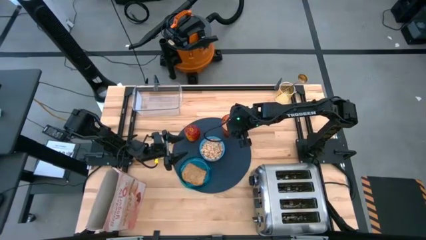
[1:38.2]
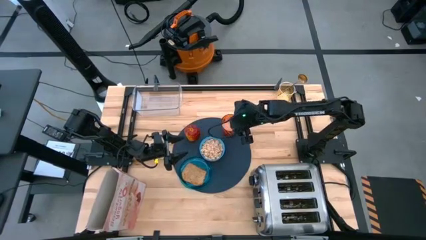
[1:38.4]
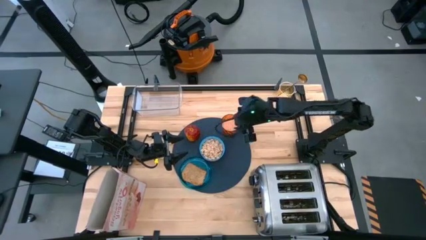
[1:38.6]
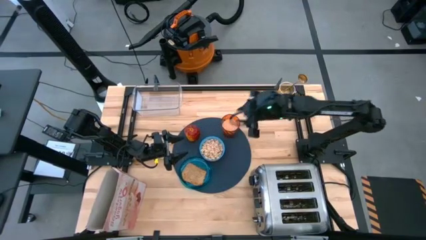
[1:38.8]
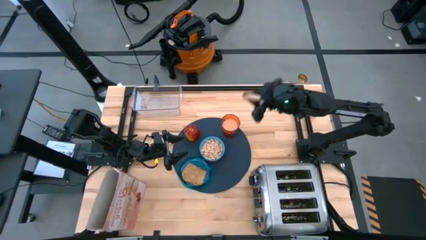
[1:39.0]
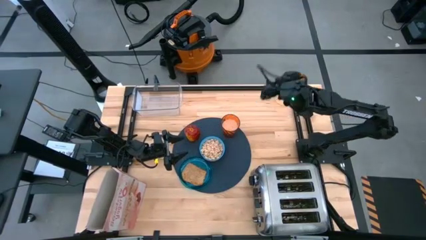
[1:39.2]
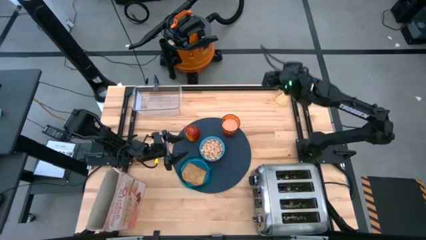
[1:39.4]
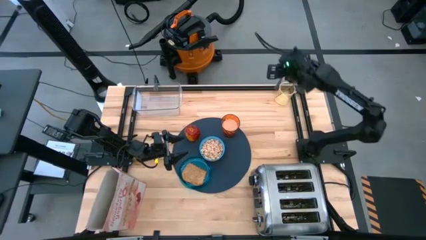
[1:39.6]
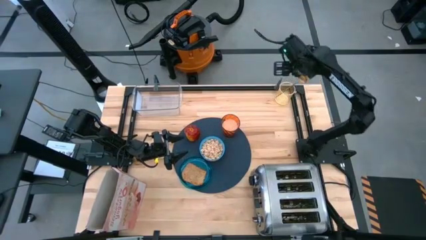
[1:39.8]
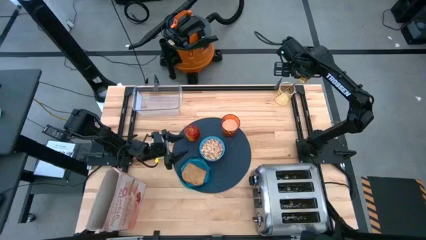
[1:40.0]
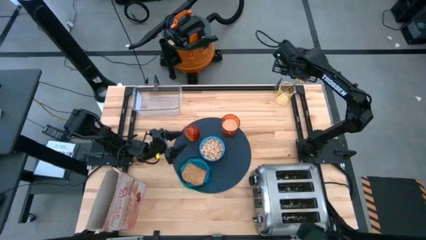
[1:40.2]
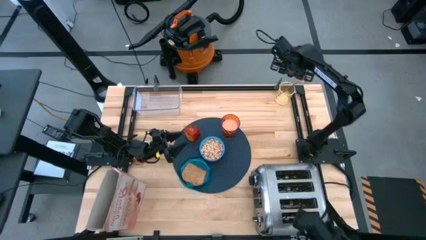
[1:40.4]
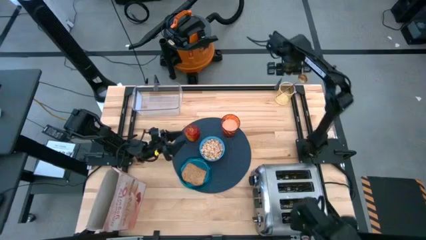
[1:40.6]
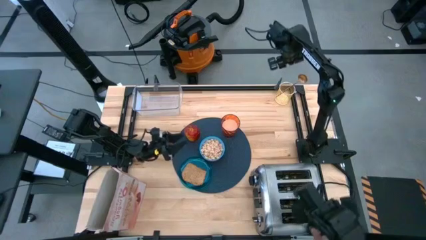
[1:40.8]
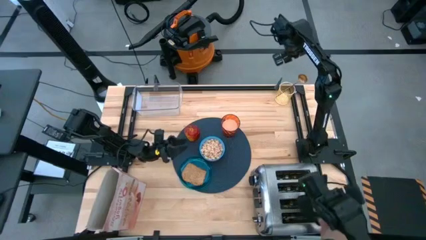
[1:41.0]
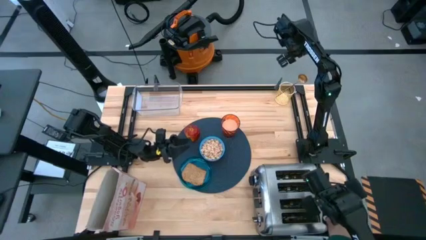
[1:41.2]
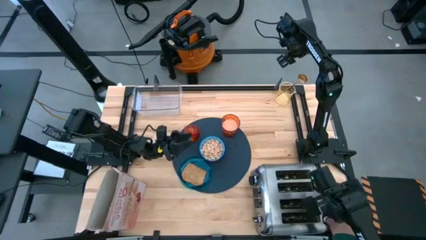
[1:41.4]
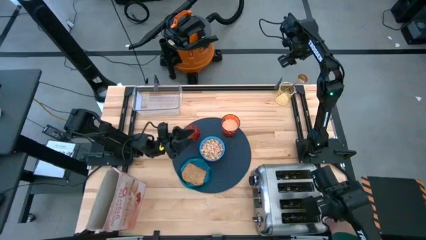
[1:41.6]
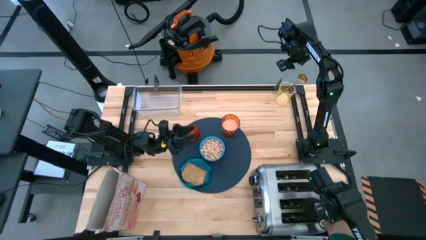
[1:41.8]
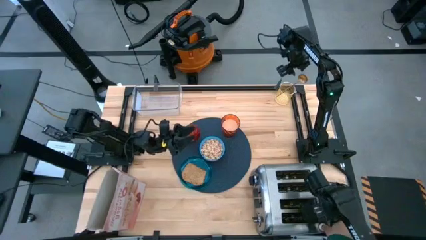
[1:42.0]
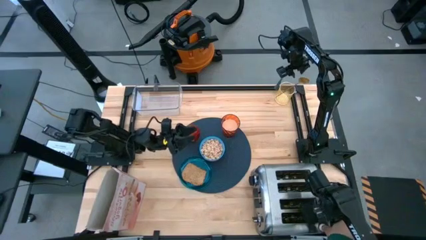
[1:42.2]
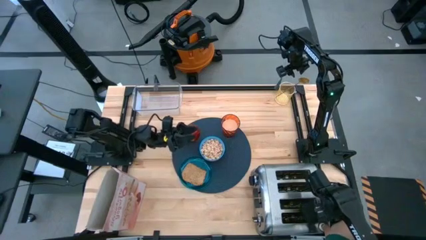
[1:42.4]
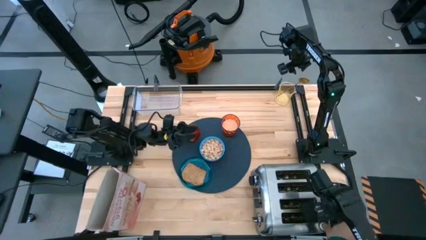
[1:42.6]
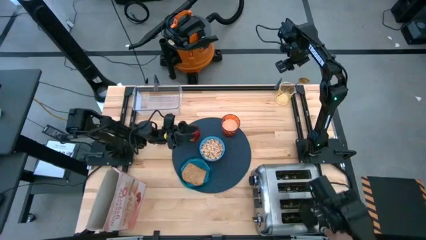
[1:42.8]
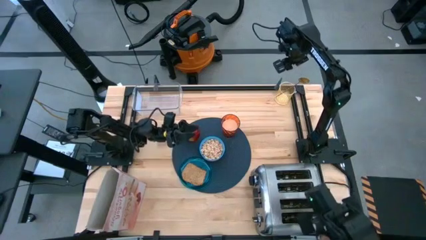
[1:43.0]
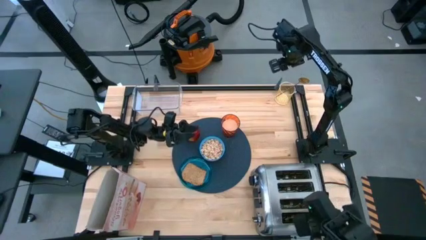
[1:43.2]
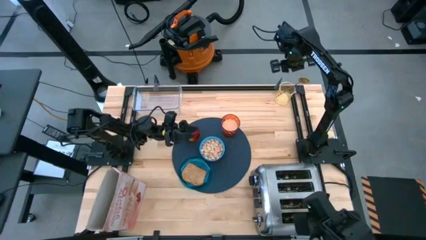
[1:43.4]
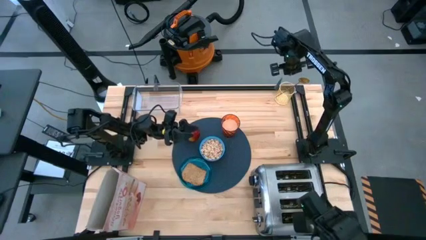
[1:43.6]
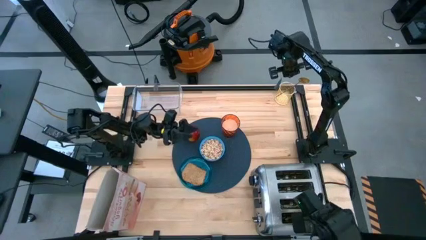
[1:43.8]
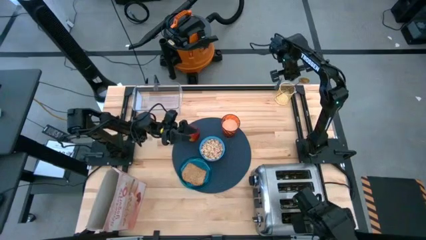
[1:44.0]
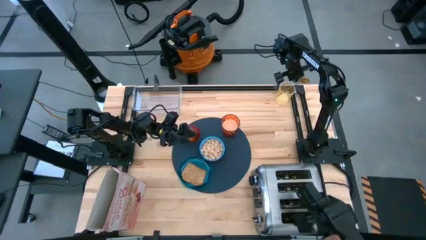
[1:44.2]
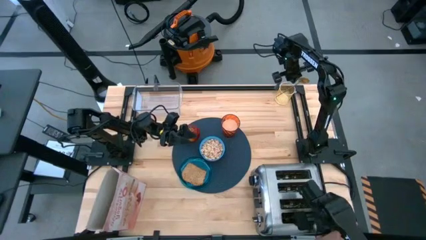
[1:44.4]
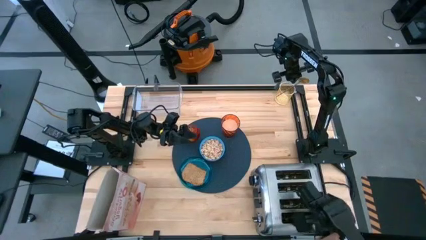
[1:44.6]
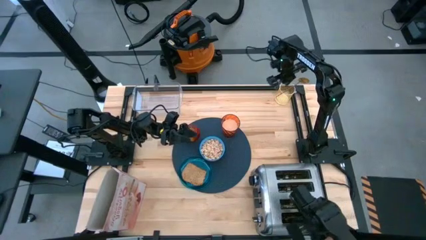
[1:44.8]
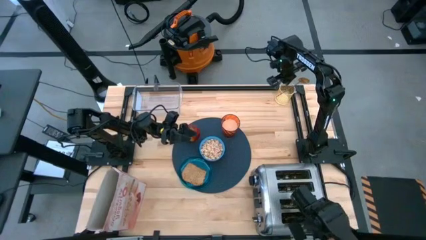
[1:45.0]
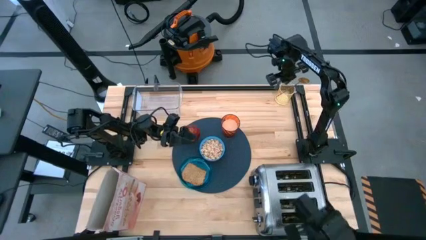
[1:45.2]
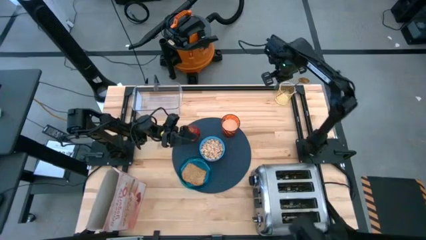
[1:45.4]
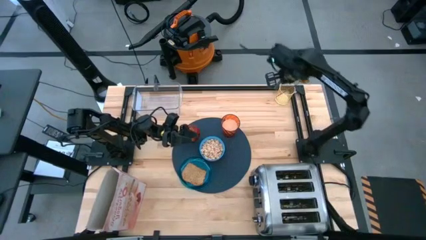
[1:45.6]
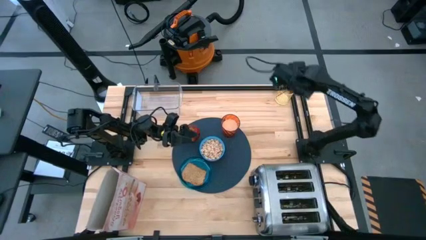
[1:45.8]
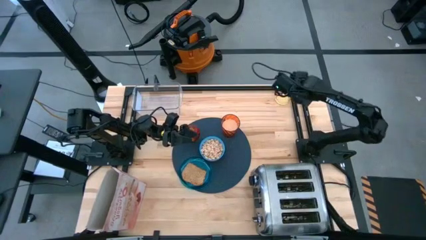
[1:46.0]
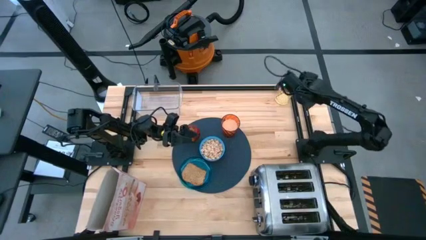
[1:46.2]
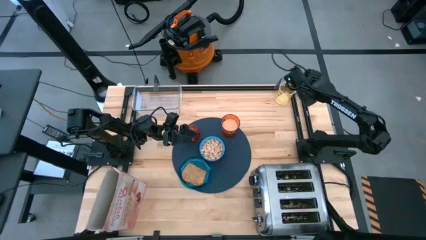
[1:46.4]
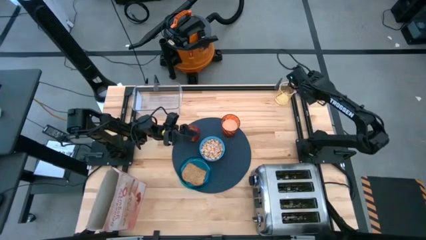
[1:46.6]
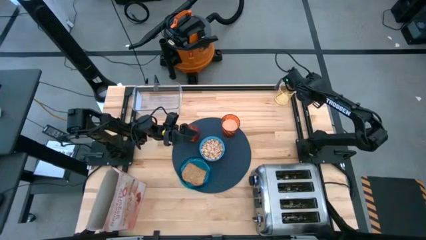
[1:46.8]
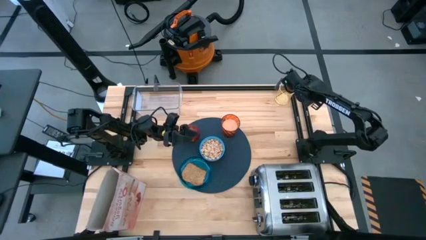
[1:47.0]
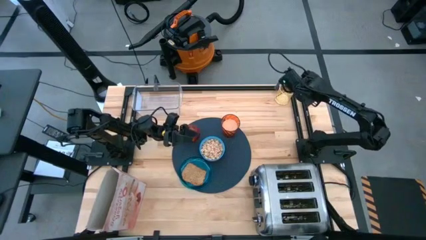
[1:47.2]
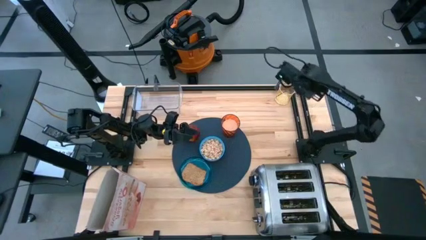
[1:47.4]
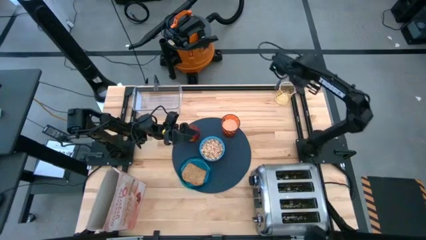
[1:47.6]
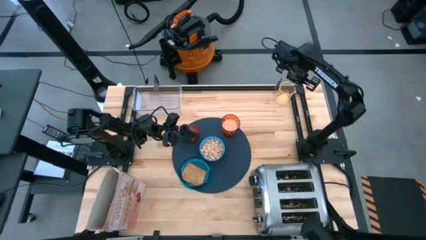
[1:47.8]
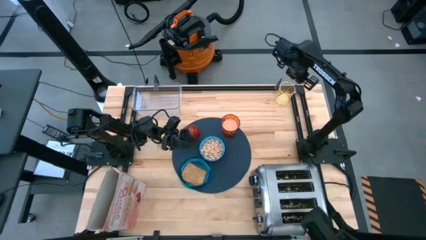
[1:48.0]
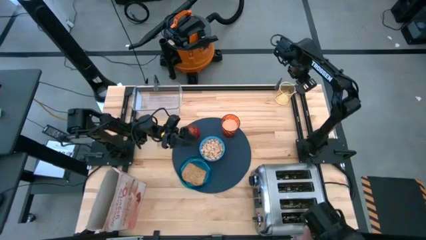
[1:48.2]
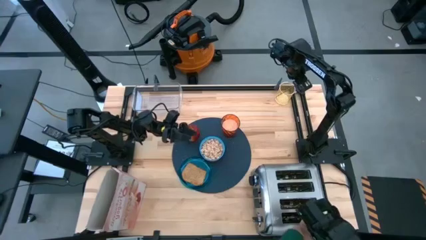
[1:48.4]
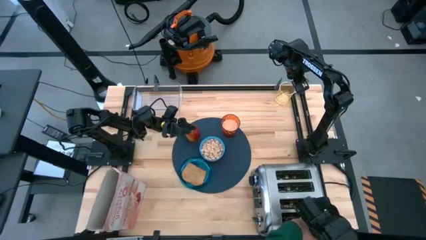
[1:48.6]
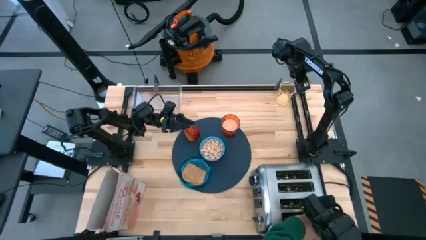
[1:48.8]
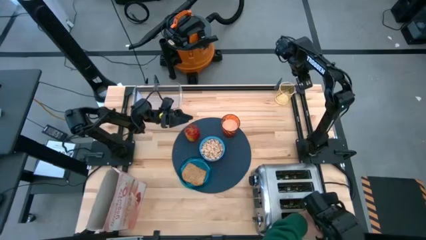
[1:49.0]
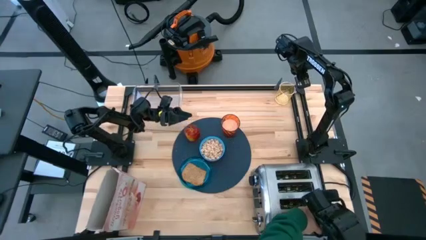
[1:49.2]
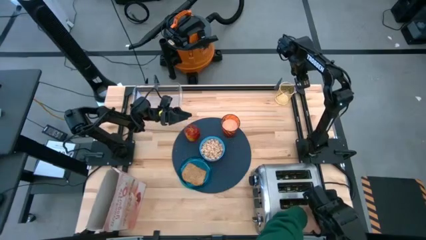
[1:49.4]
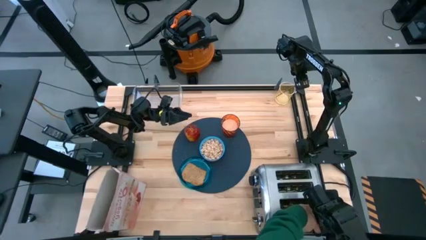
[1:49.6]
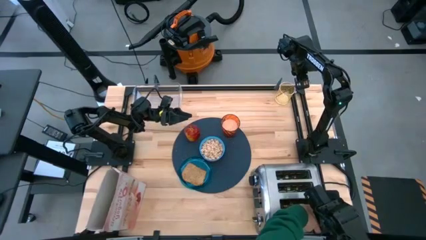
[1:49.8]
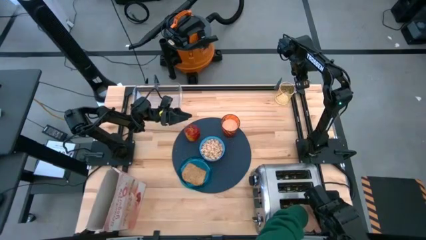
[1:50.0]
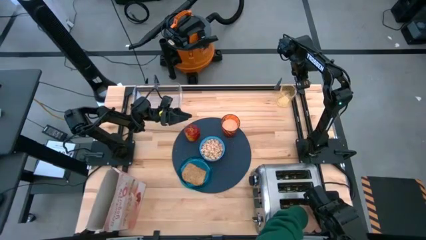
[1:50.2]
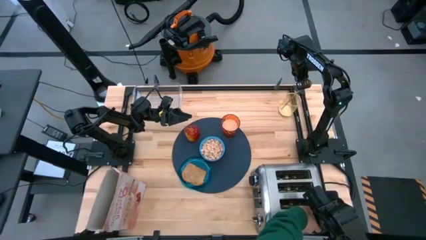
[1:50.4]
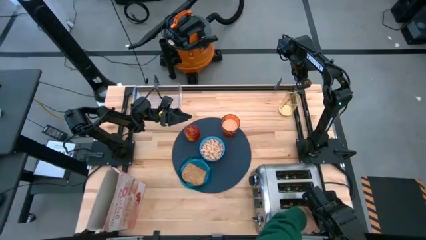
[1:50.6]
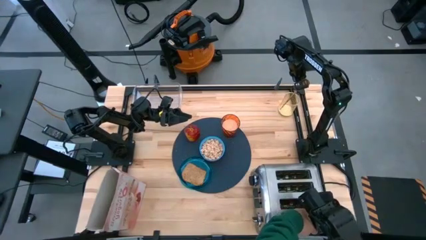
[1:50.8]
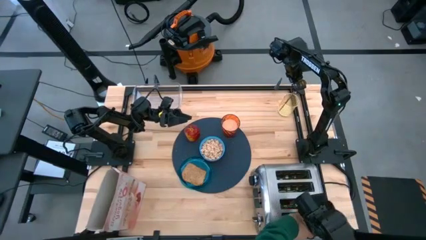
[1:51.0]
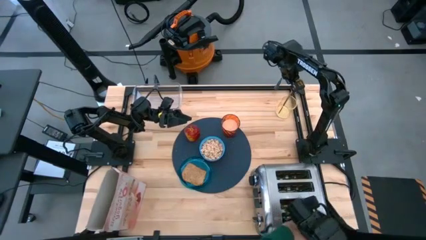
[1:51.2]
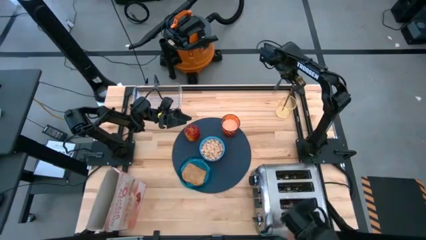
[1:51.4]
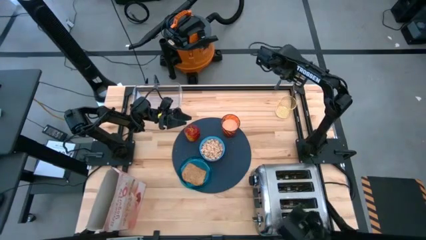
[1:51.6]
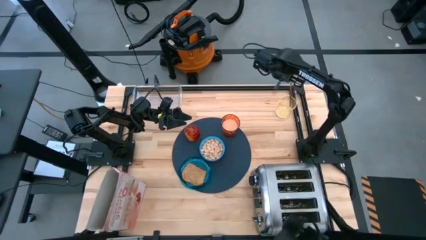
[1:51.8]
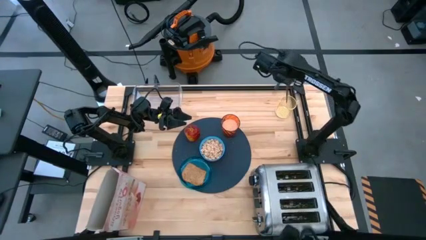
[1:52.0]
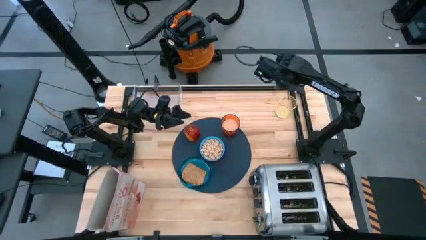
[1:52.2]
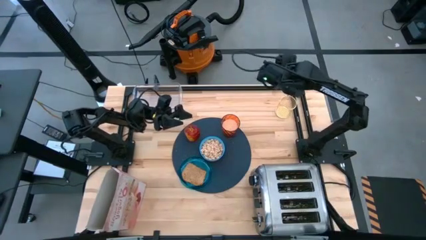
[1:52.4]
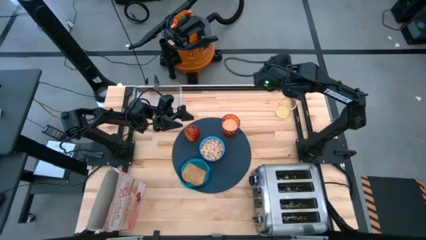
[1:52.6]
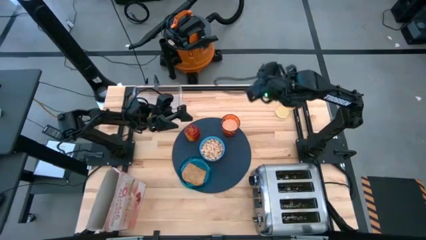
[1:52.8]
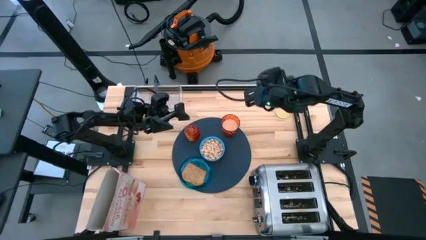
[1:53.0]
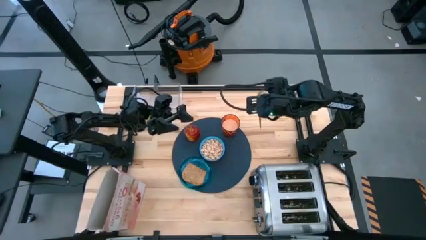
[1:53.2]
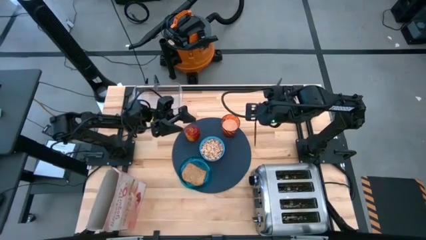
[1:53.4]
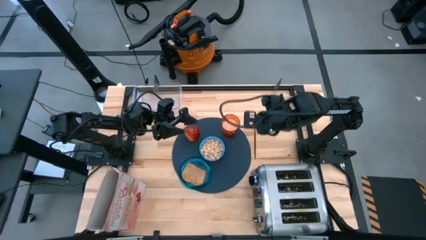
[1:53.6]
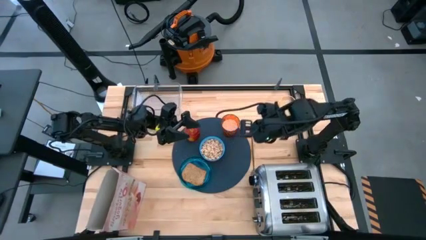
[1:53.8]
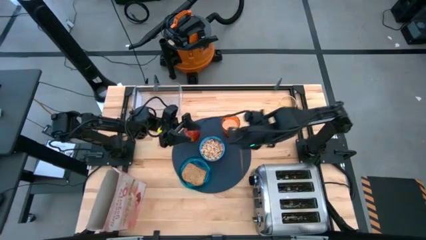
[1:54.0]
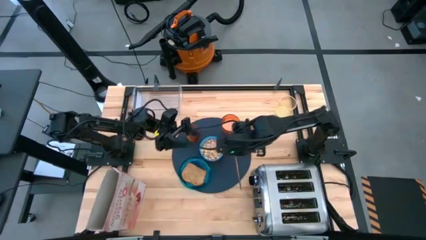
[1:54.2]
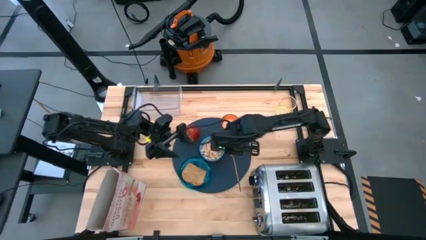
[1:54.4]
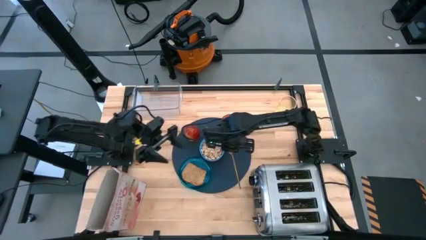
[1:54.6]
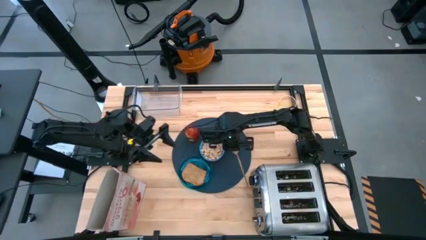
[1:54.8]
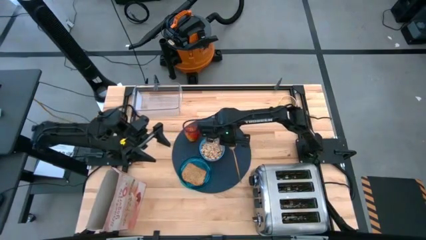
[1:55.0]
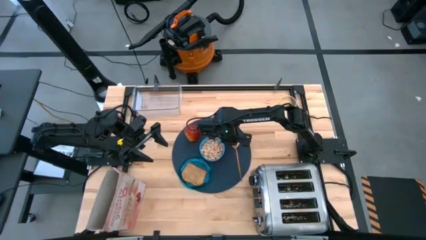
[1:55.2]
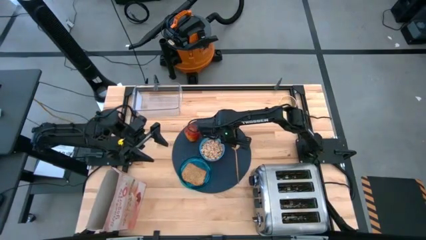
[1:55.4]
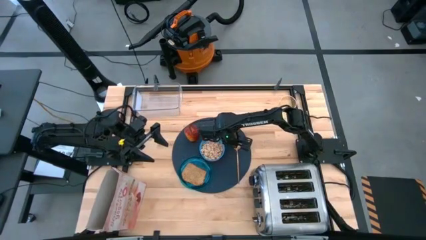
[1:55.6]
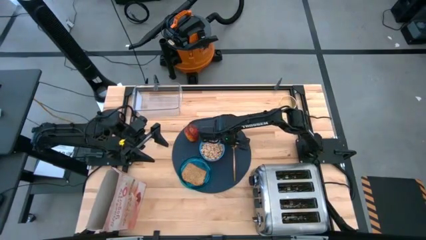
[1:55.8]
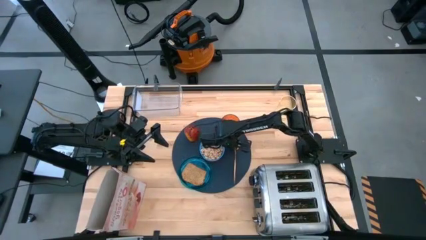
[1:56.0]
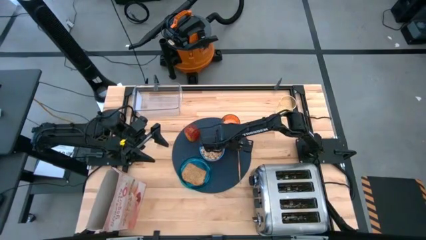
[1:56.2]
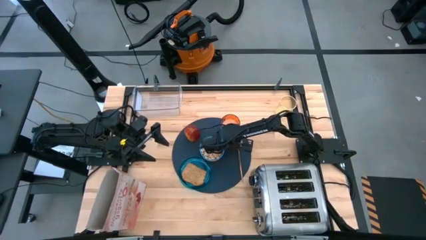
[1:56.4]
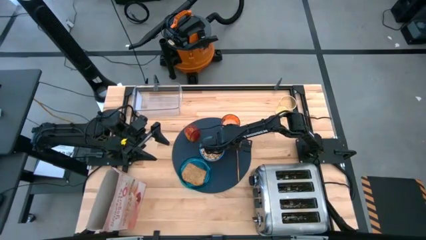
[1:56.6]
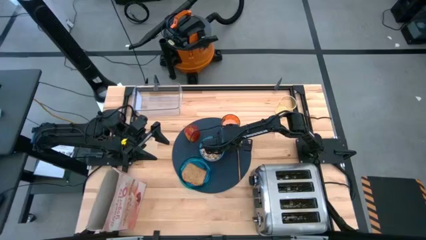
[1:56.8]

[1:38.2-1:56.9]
Task: Arrange a breakfast setting
Put the spoon from the cup on the right side of the bowl on the placemat
